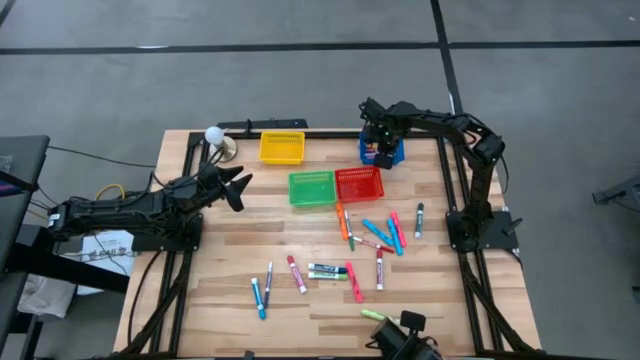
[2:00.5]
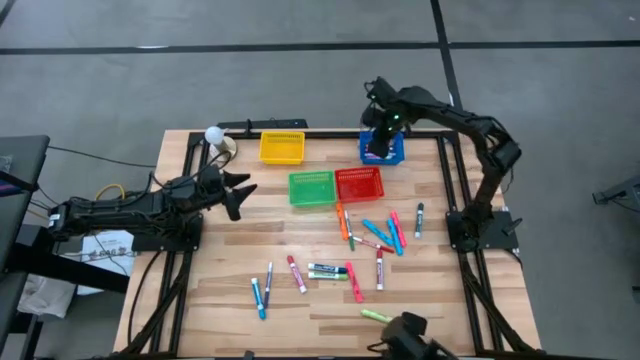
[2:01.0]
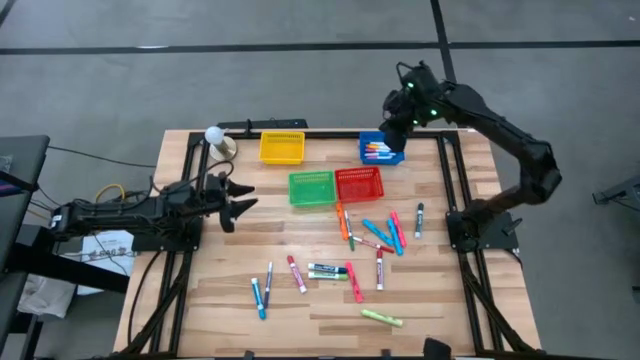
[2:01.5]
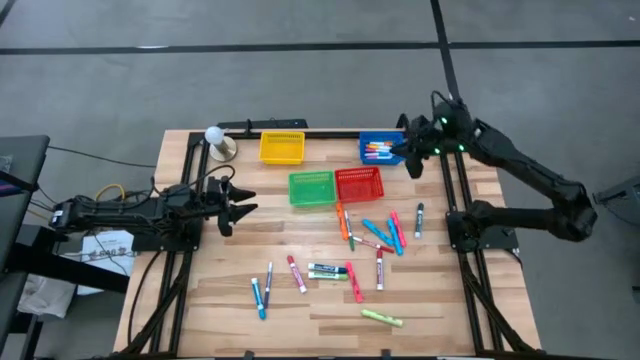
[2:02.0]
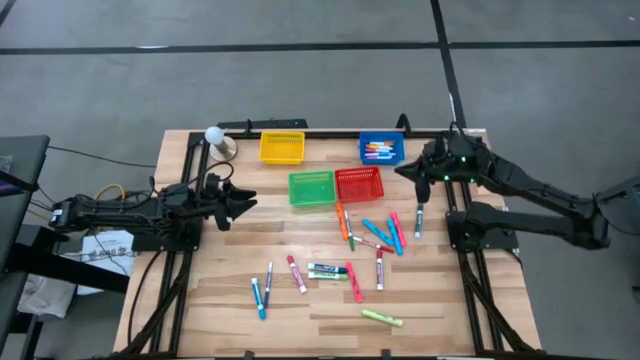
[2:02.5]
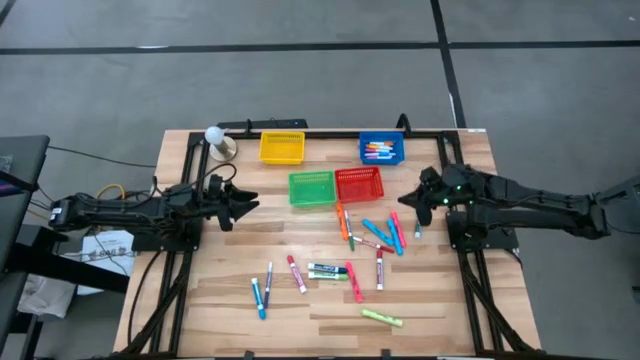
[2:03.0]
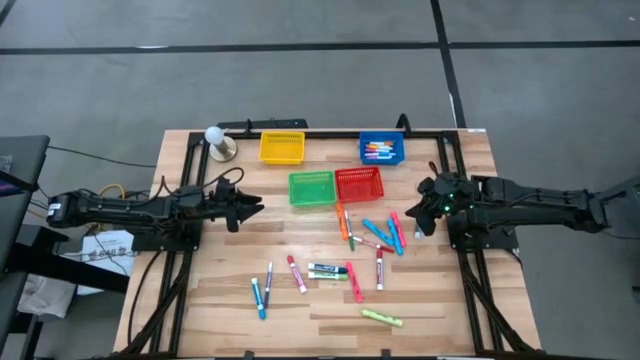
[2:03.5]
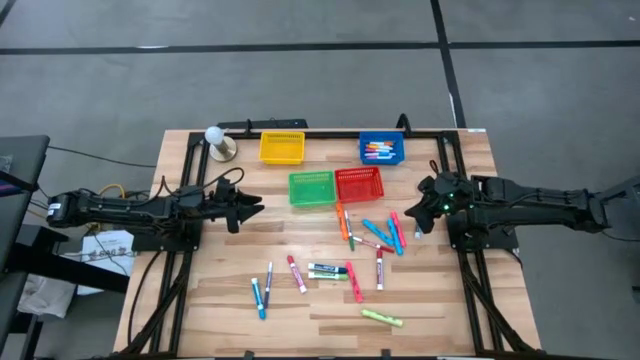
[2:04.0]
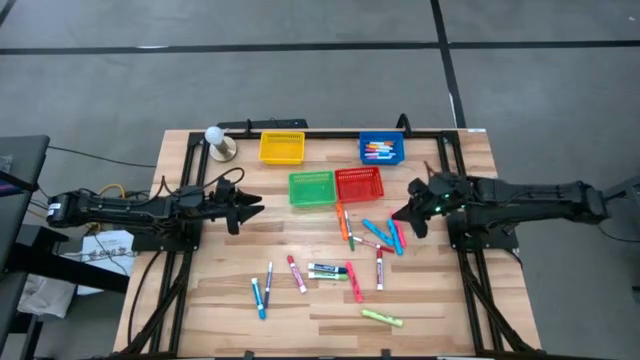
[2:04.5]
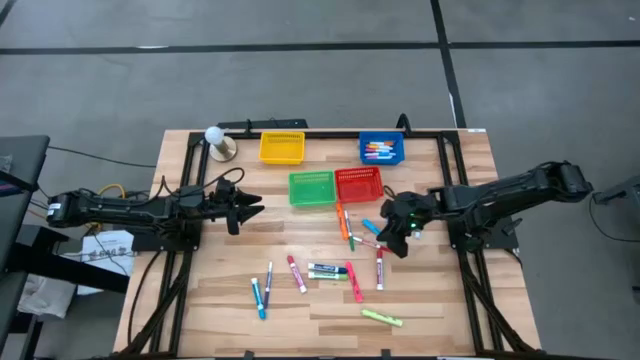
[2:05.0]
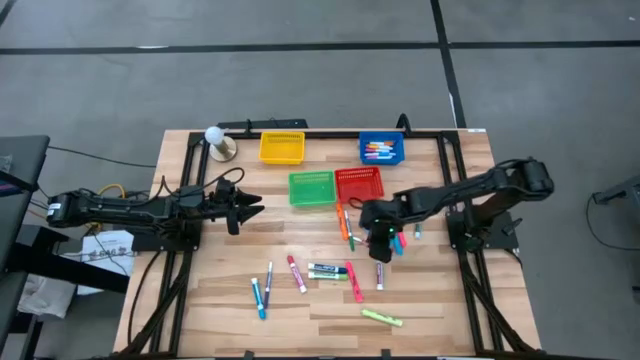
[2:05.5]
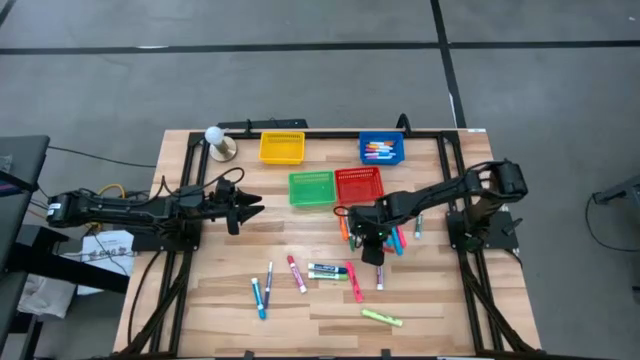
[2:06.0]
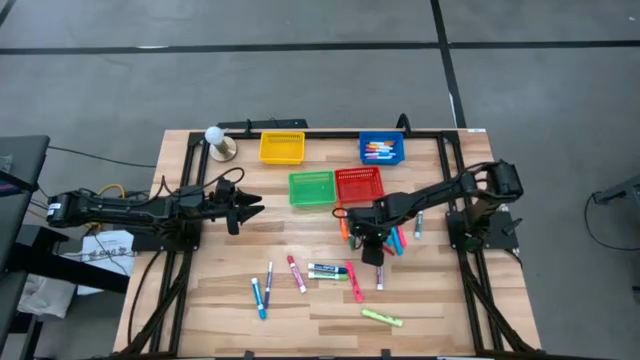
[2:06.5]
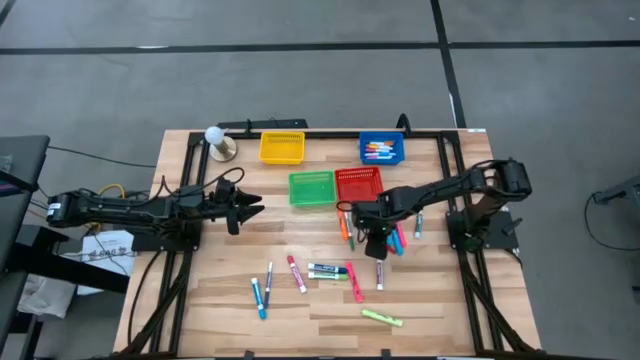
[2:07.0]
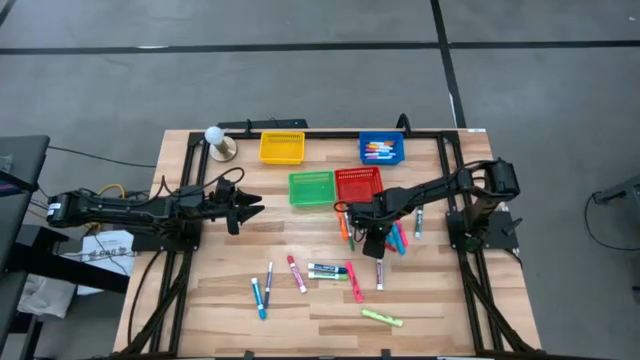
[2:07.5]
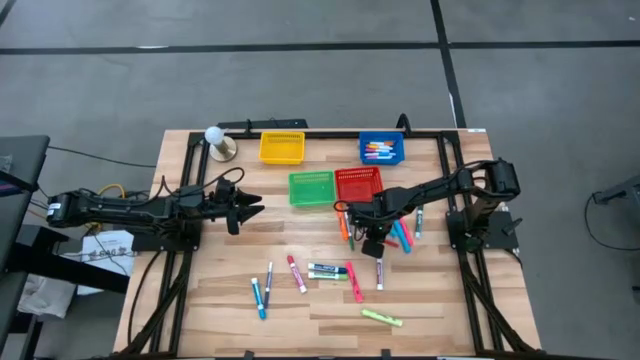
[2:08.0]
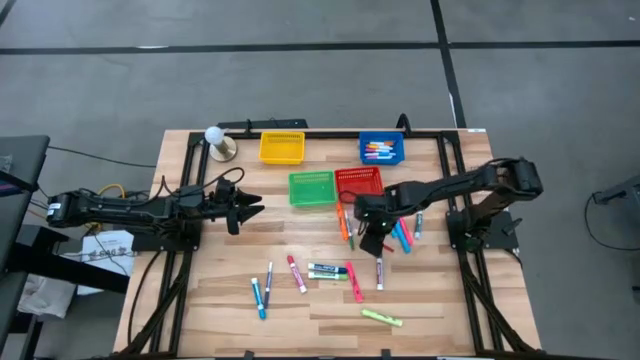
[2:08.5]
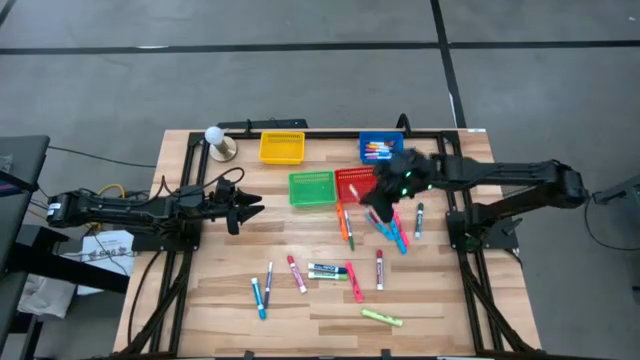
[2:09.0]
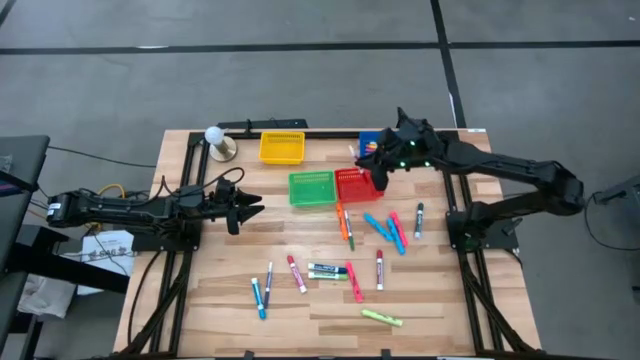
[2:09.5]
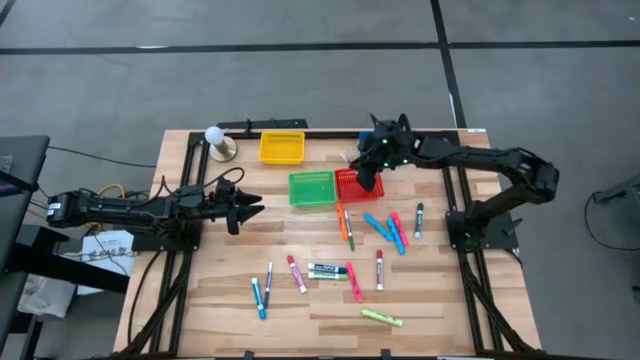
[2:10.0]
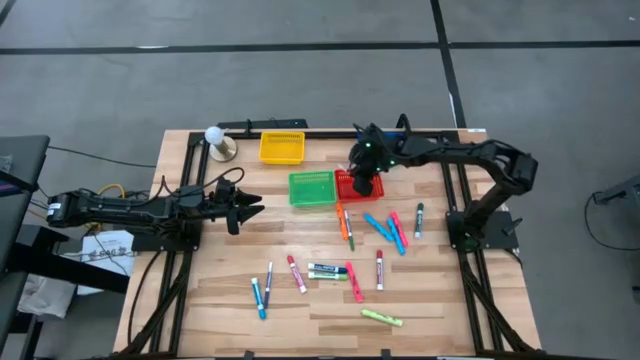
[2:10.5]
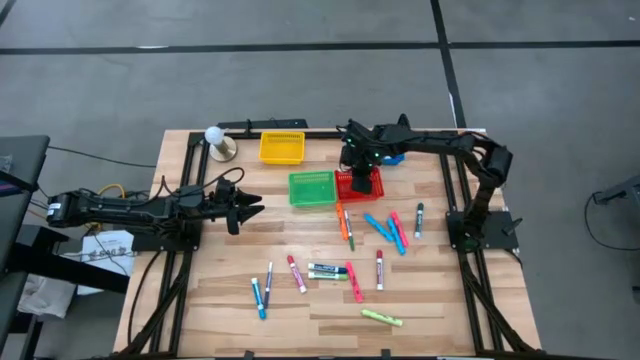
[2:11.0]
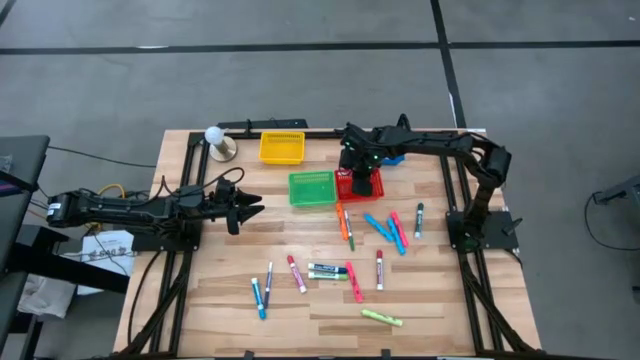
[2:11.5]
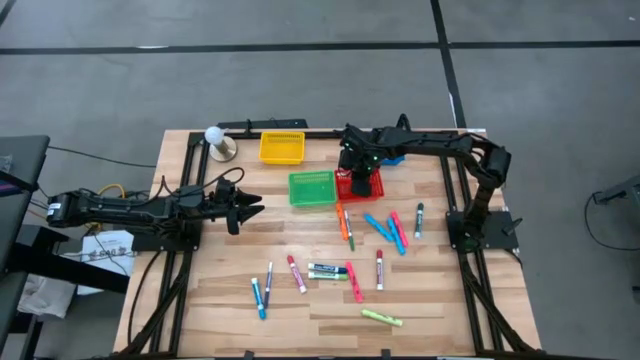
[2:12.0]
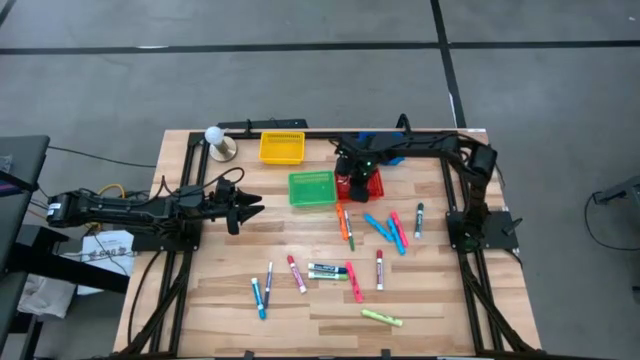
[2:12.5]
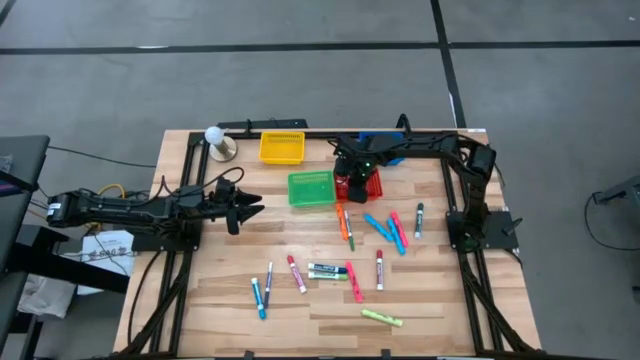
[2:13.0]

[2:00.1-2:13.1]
Task: Pick & Place Markers
Put the small red marker pen into the red bin

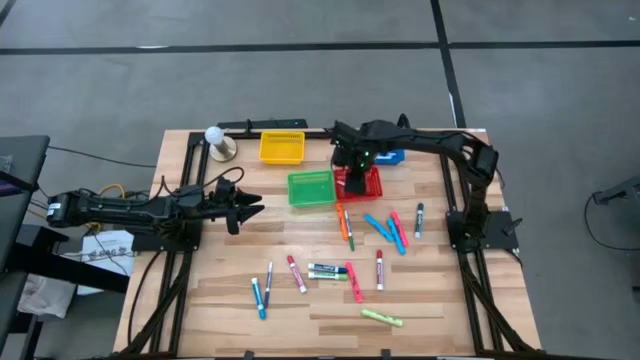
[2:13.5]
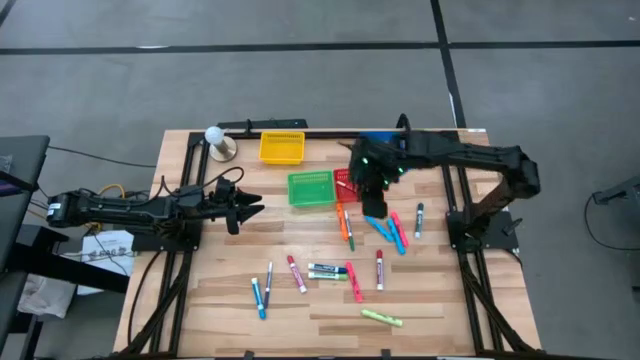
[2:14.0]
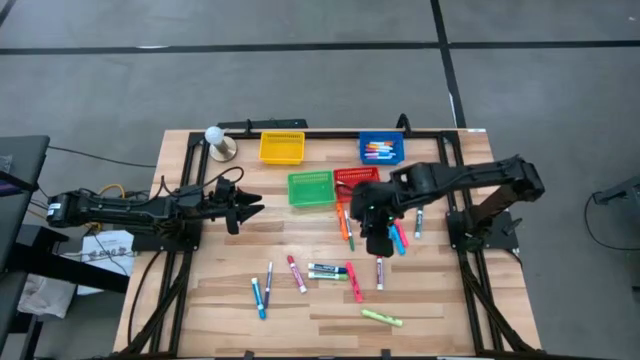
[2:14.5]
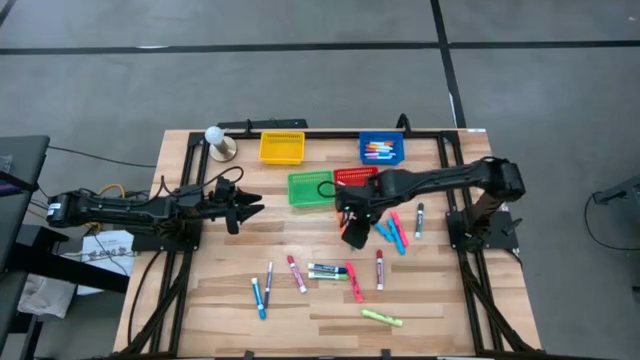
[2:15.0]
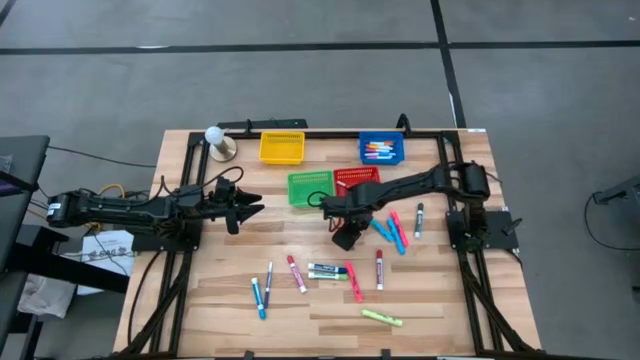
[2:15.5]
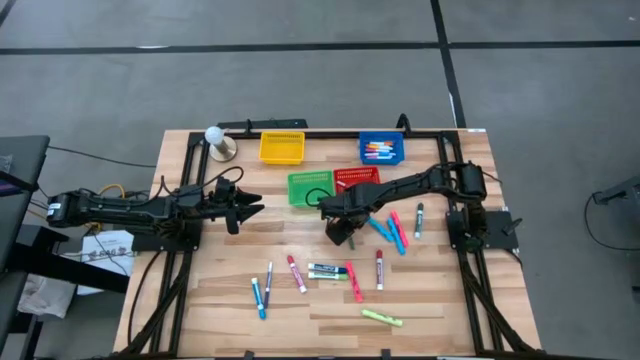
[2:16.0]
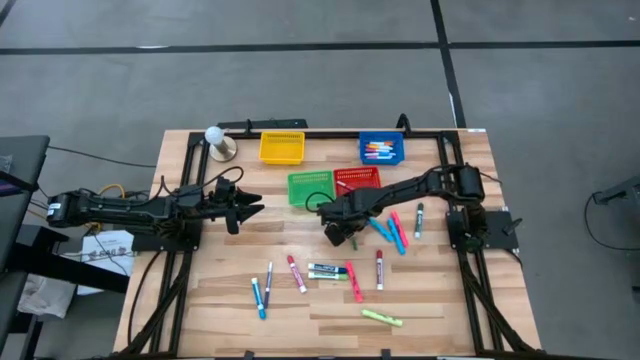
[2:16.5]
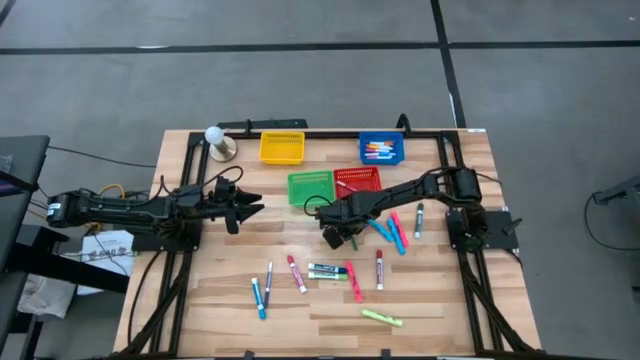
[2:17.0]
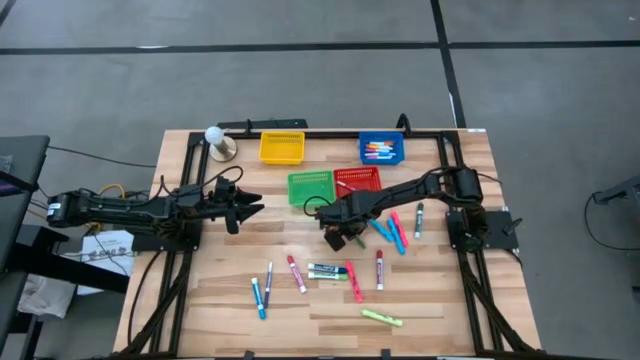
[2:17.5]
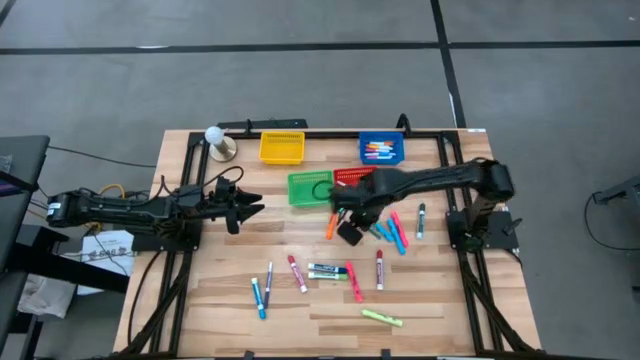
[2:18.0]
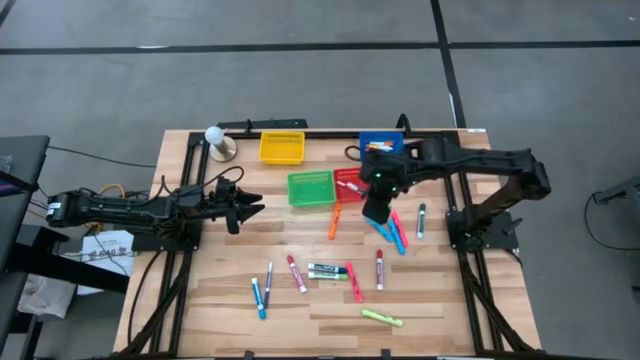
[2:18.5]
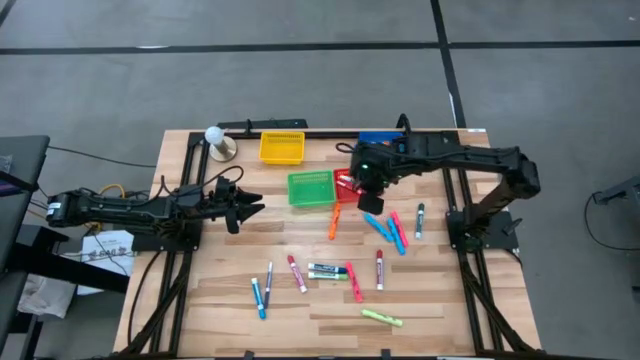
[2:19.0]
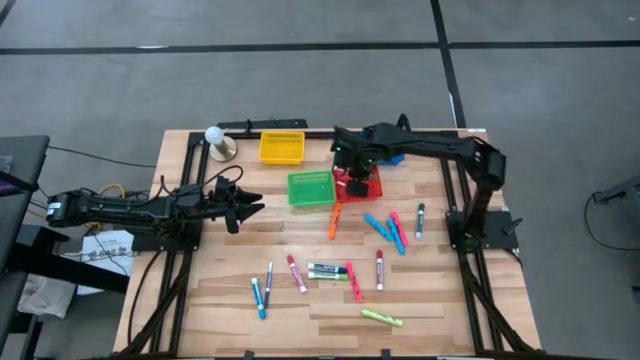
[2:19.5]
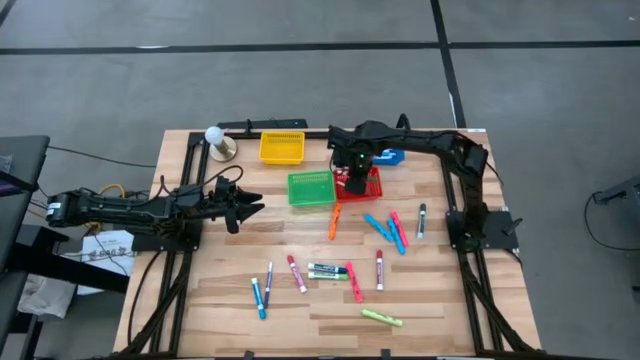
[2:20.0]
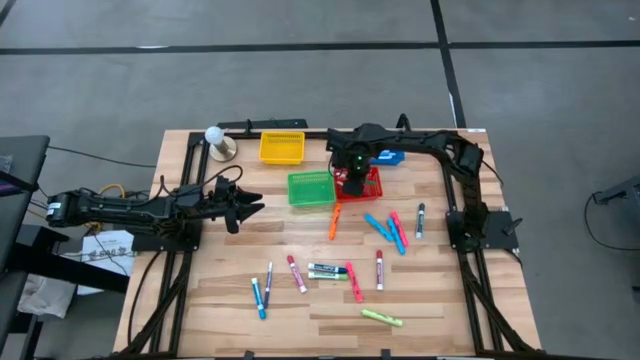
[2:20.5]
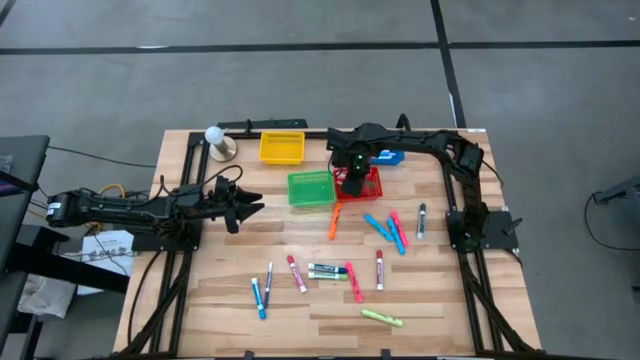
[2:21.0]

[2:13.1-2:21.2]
Put the small green marker pen into the red bin

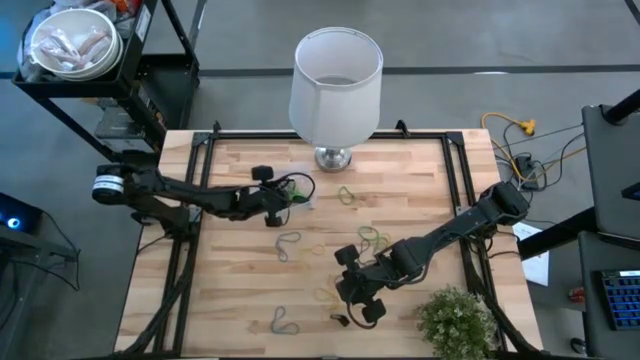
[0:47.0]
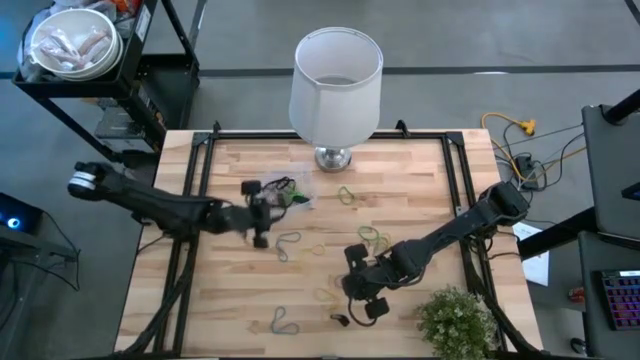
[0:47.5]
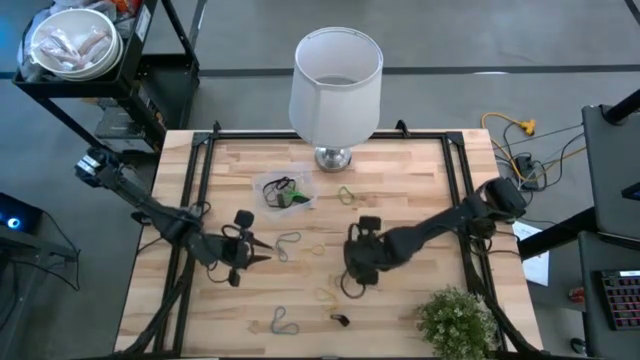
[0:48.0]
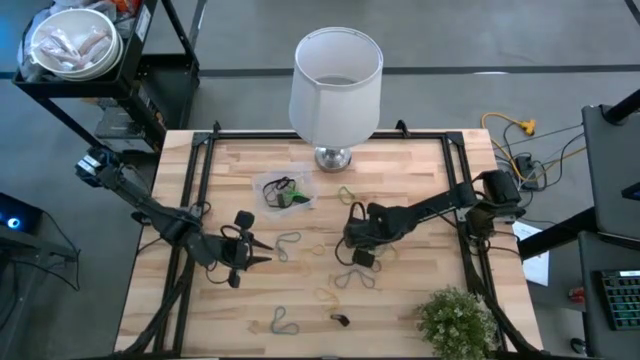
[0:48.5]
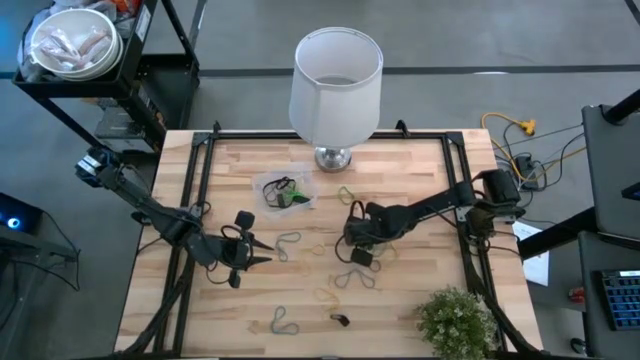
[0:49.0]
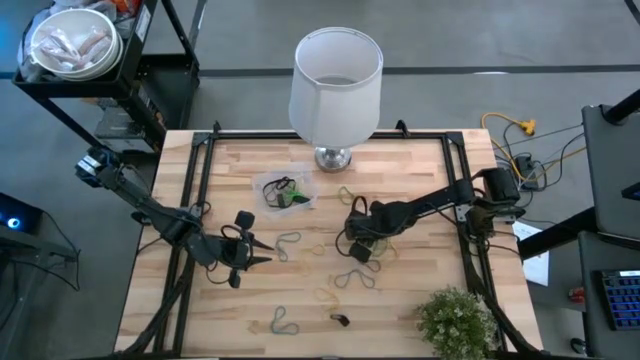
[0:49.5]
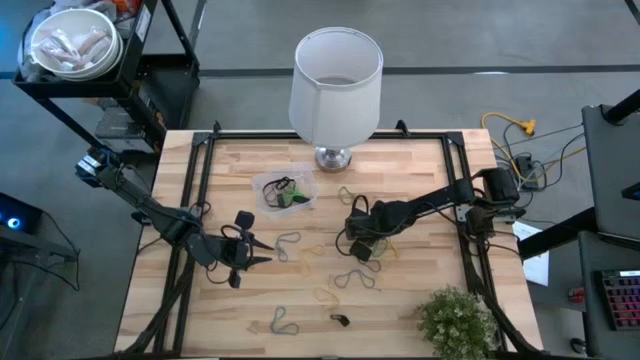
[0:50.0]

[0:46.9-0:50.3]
Task: Pick and place rubber bands into bin
Put the green rubber band into the transparent bin
